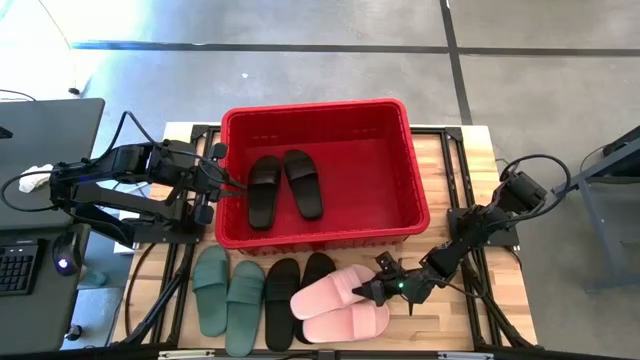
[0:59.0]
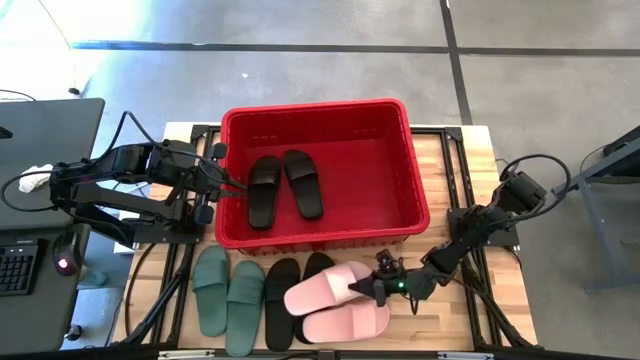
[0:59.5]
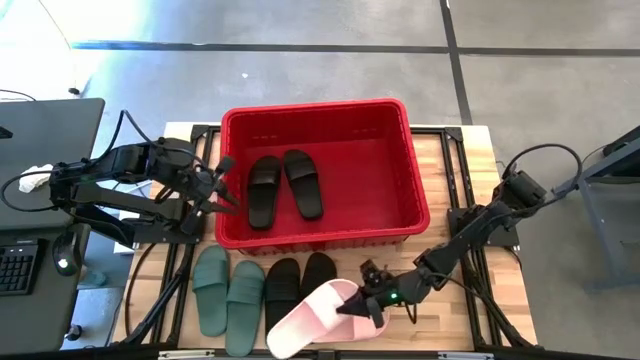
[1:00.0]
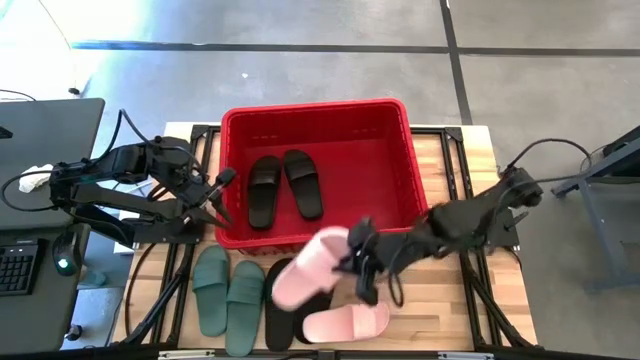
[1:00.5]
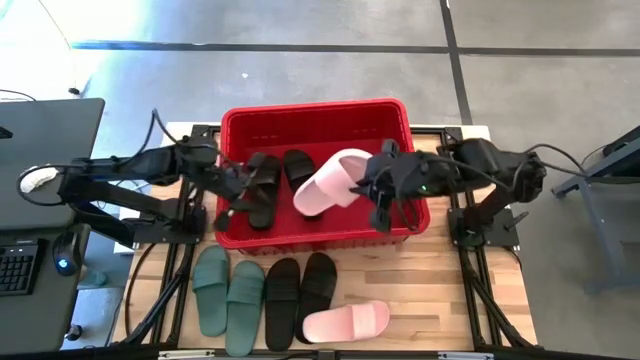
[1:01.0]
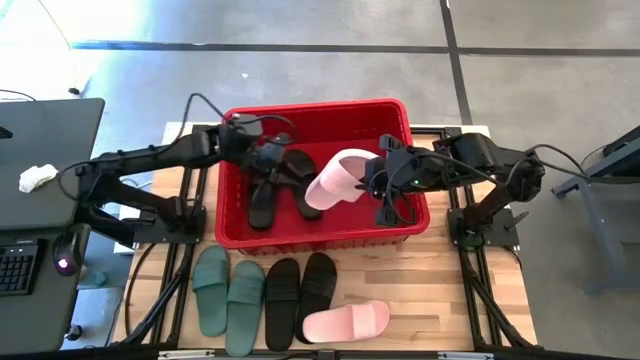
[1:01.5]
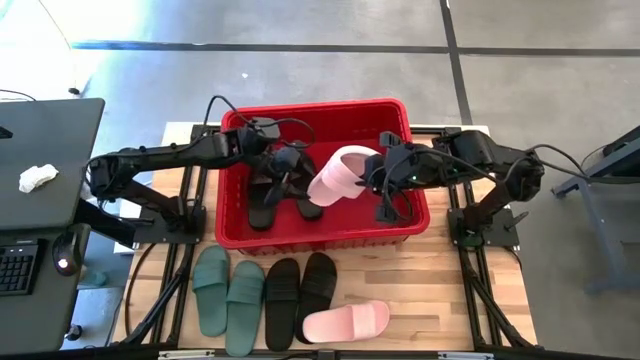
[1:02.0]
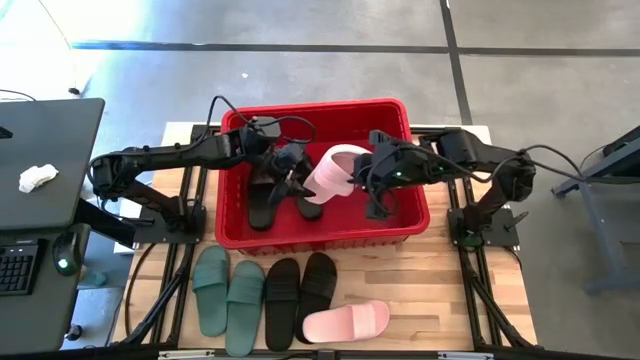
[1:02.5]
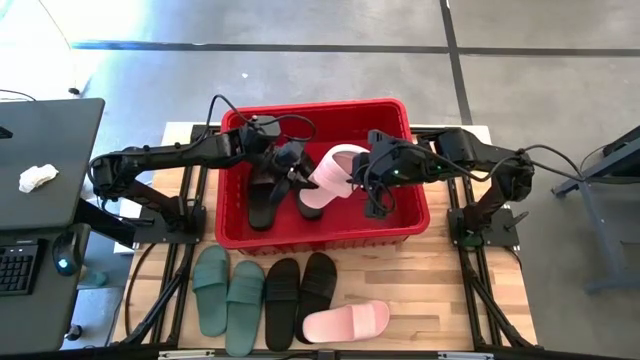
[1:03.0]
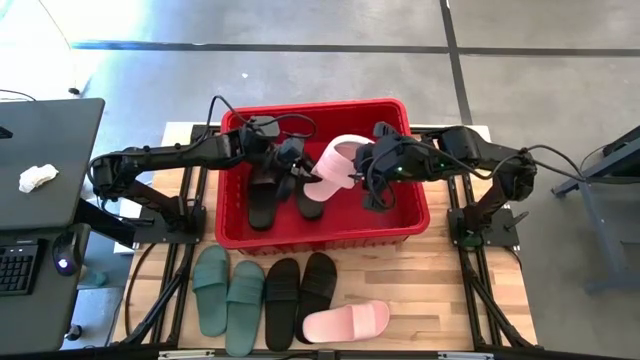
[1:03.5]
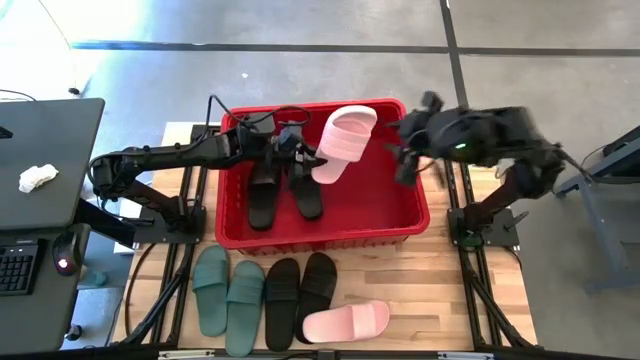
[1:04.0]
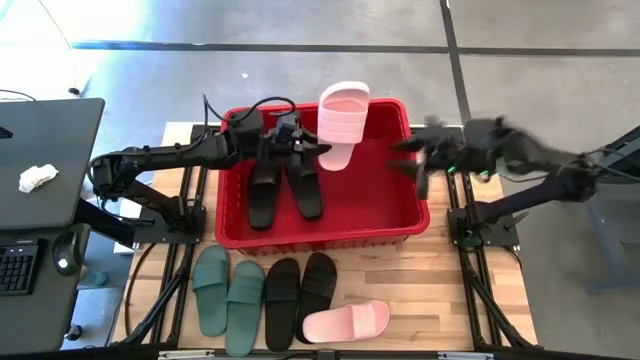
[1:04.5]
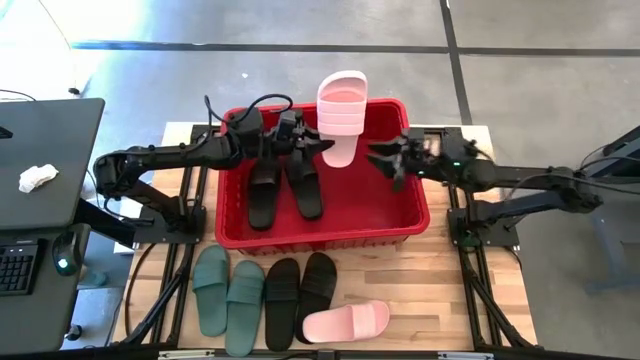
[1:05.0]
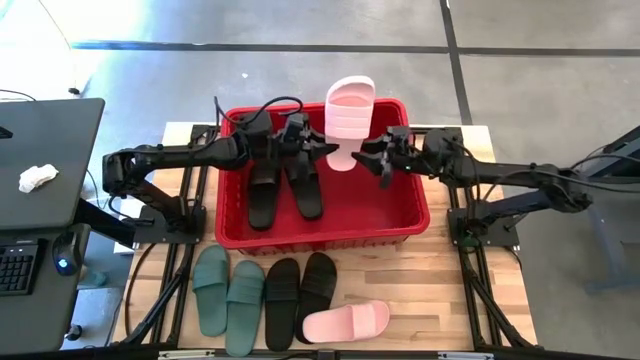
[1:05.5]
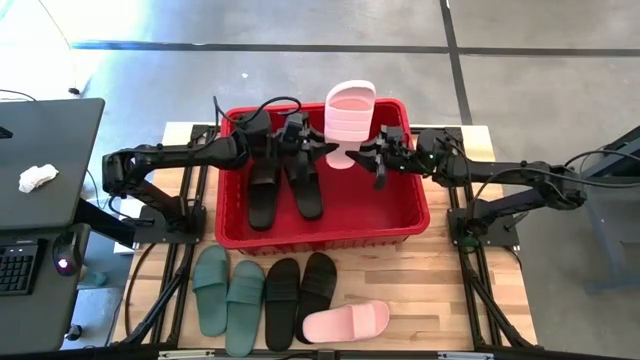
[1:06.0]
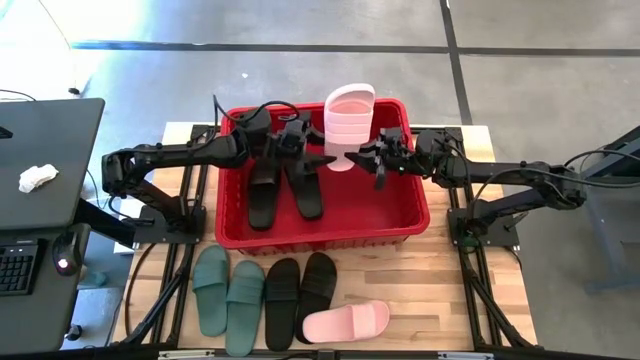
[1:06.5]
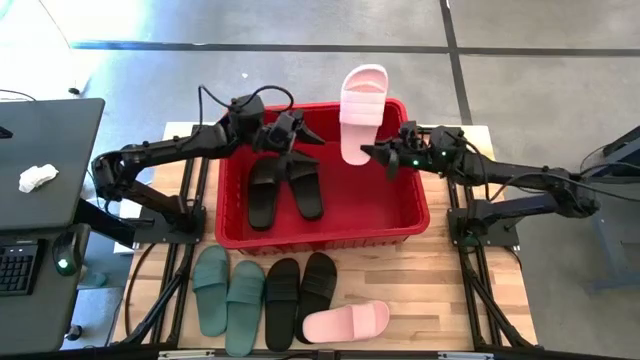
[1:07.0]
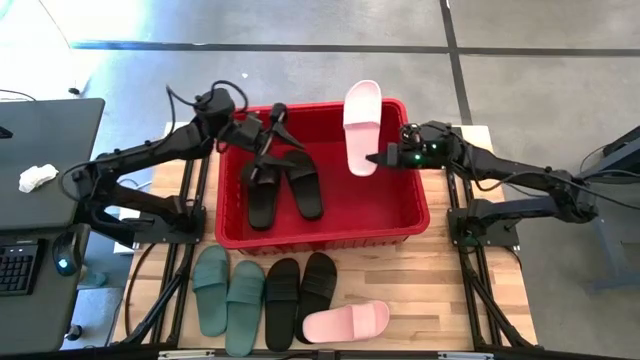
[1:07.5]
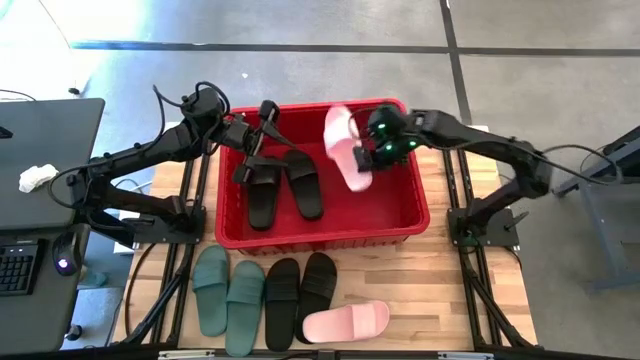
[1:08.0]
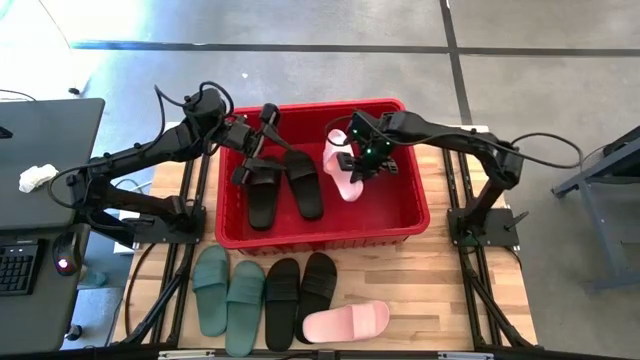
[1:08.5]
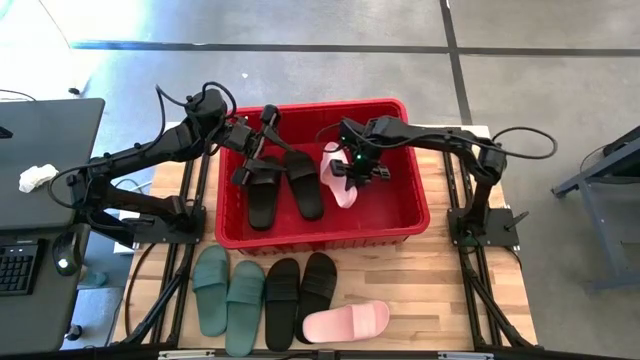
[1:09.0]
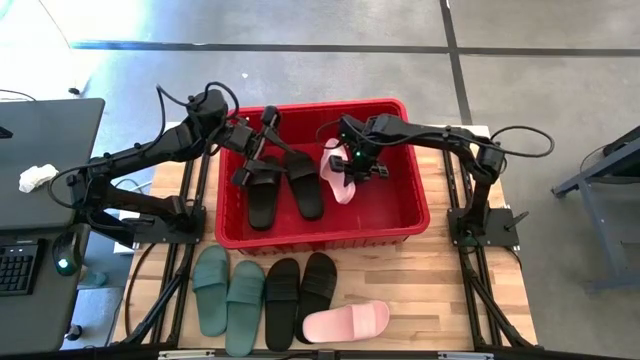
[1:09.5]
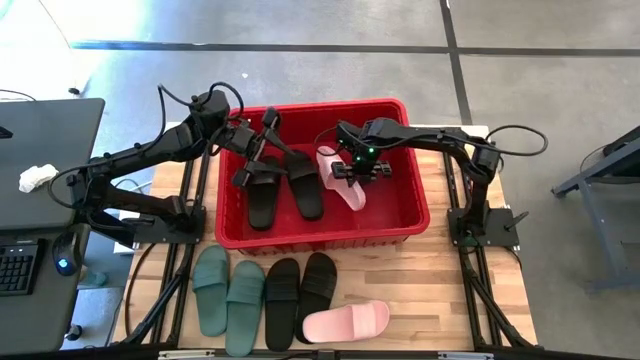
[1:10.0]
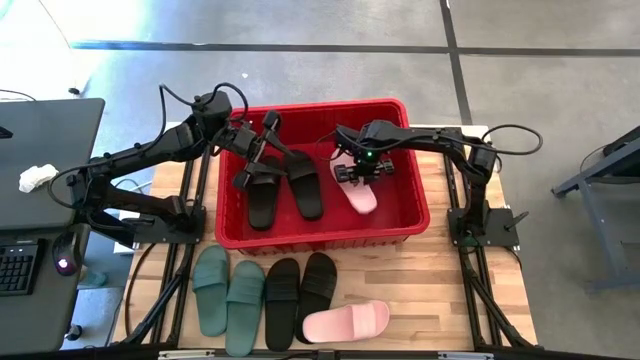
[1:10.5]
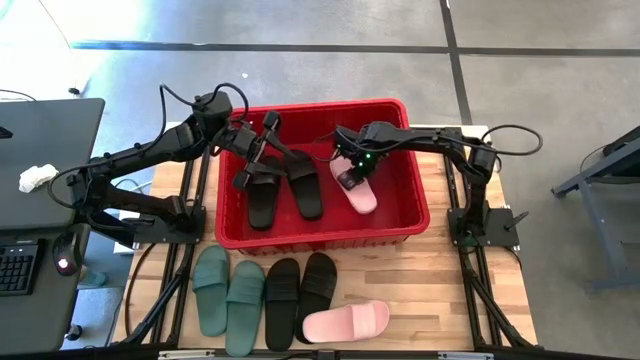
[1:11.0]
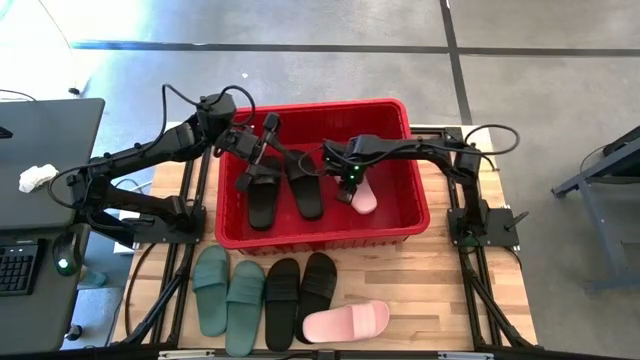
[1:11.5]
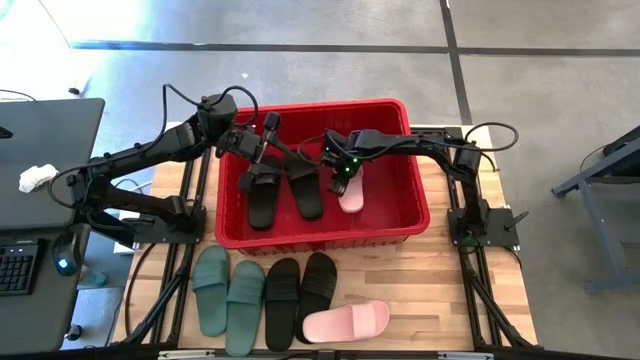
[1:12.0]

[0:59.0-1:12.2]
Task: Pick and place slides into bin
Put the pink slipper into the red bin

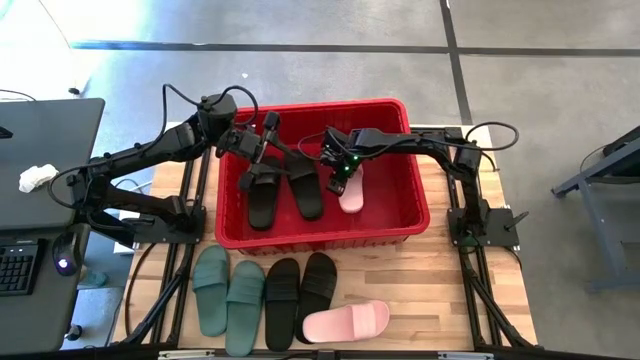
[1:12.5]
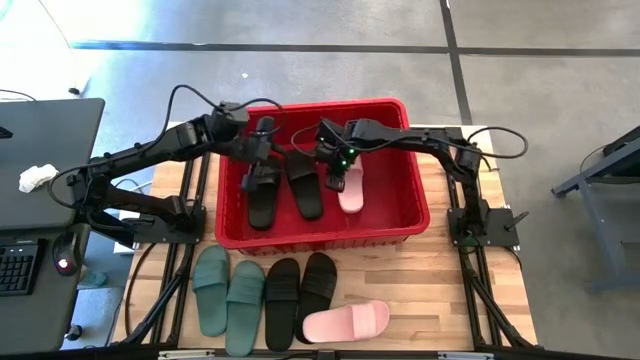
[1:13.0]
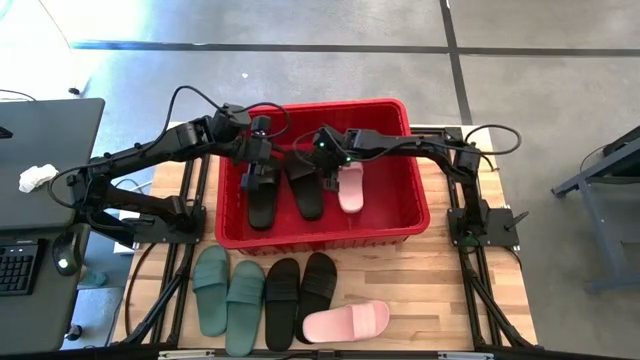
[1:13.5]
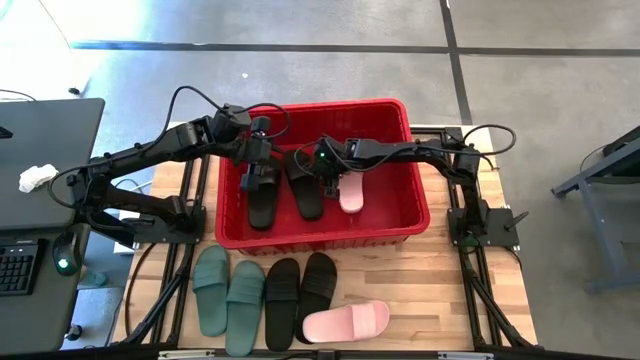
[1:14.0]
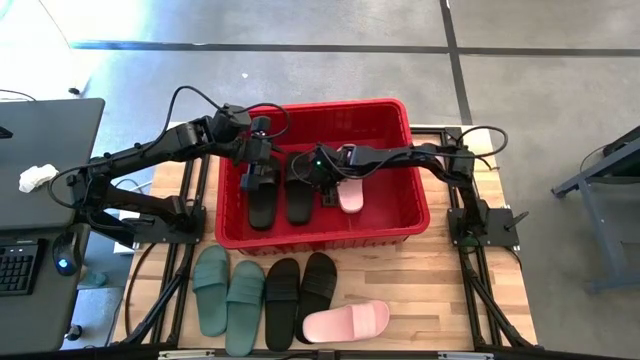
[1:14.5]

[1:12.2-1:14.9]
Adjust the black slipper in the red bin

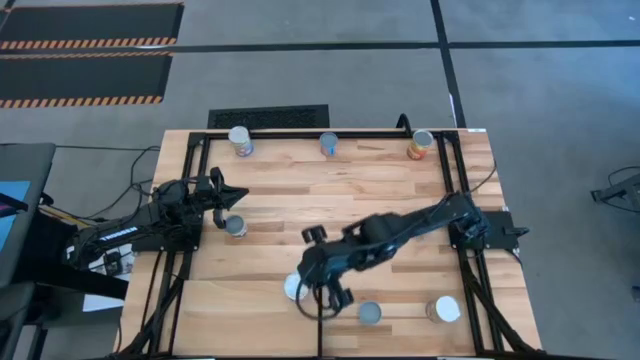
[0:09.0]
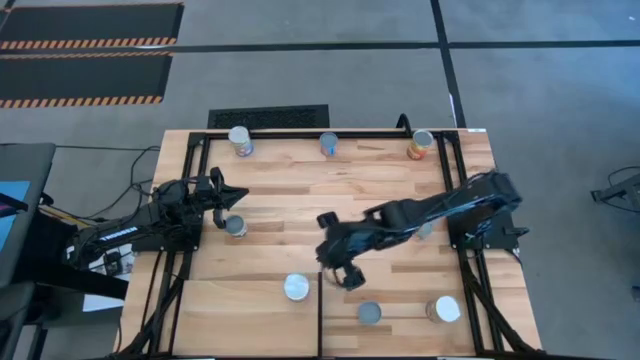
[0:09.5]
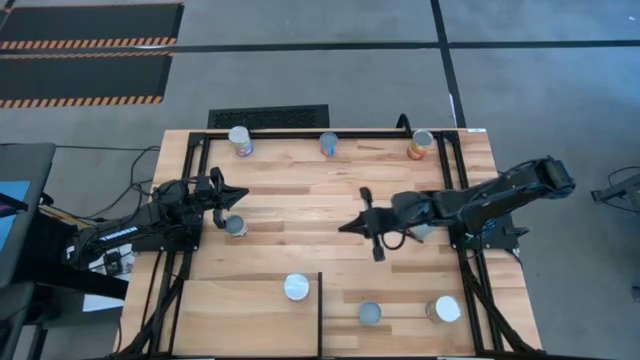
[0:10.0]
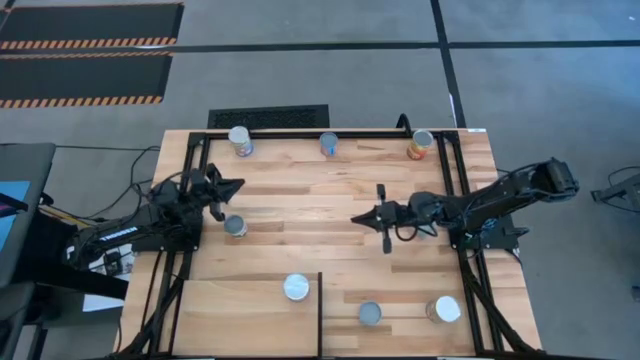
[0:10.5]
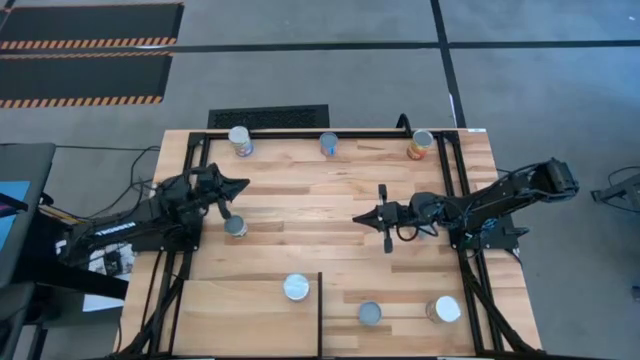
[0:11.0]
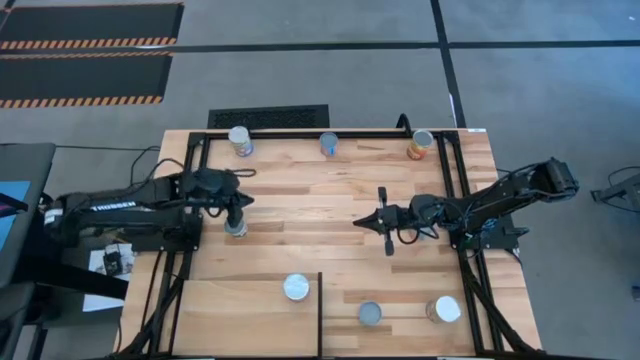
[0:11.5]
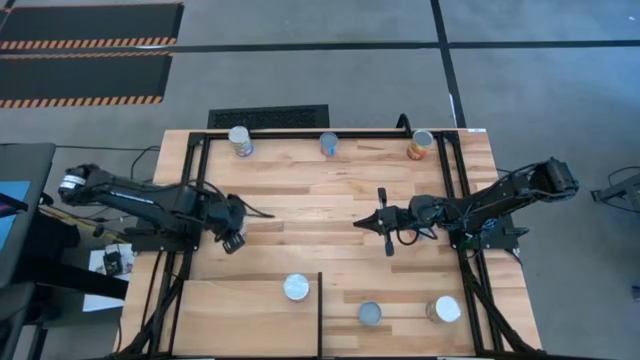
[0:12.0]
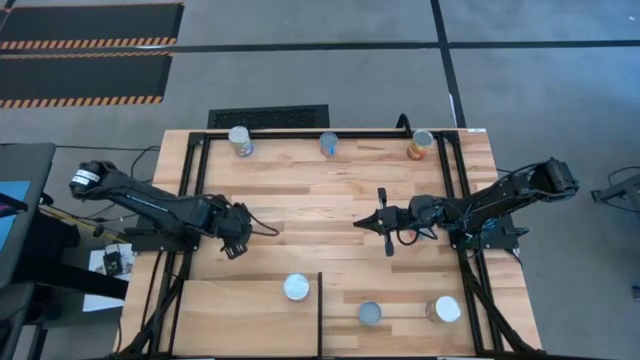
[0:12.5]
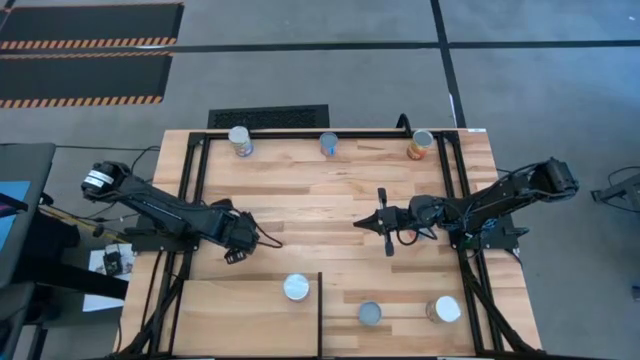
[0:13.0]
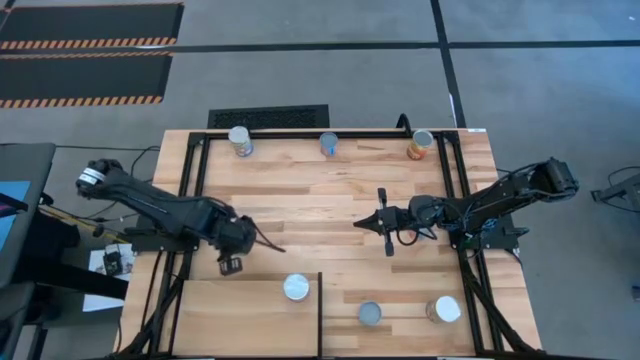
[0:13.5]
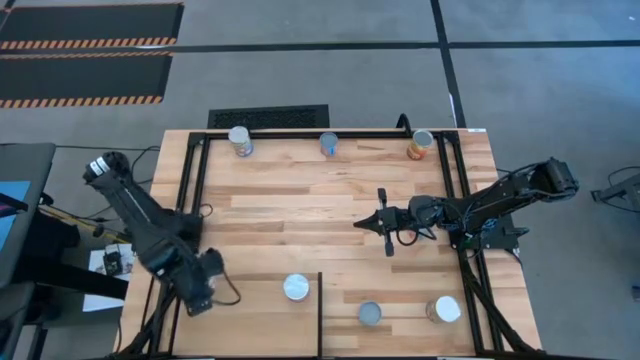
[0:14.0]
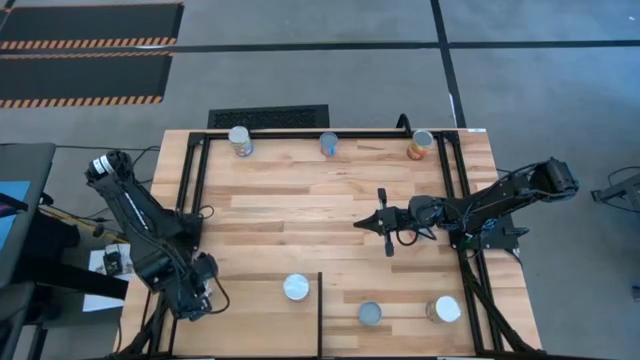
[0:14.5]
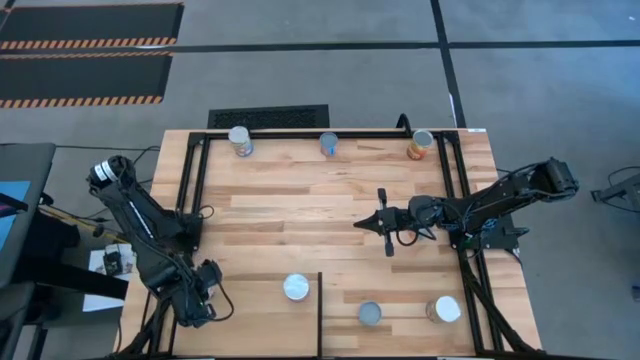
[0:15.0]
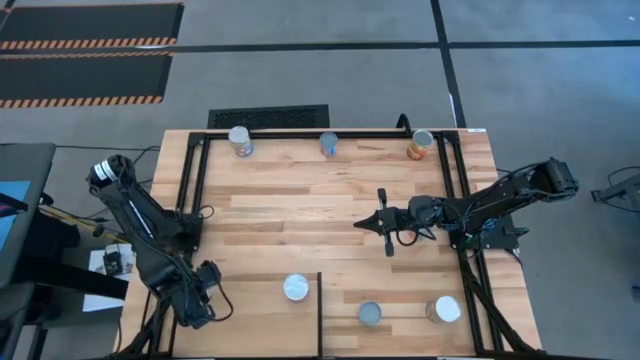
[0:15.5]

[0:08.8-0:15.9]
Task: Pick and place cans onto a shelf
Put the canned green peas on the shelf
